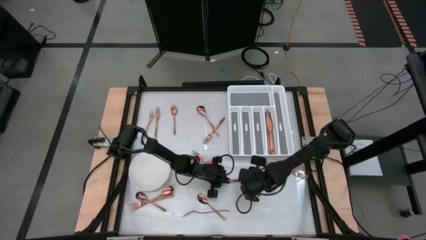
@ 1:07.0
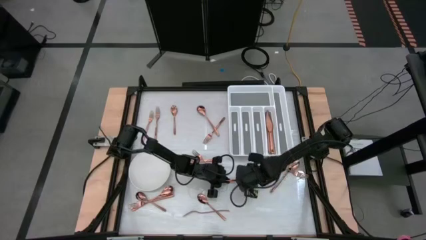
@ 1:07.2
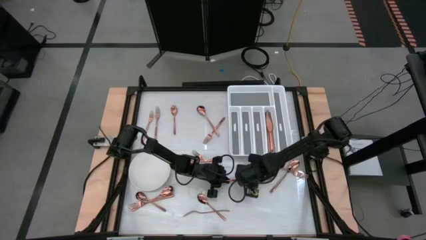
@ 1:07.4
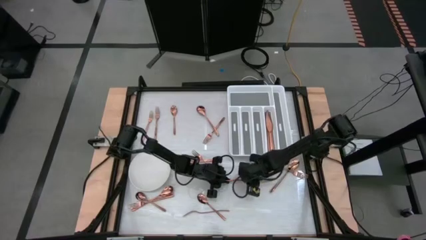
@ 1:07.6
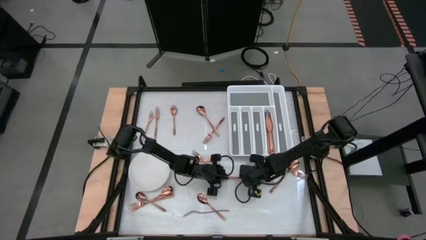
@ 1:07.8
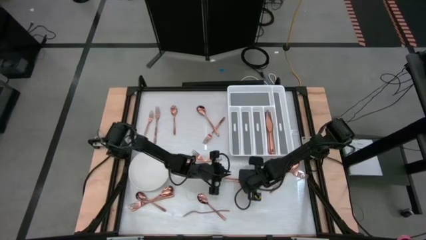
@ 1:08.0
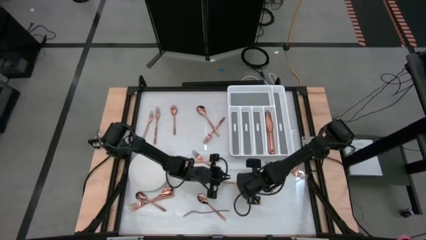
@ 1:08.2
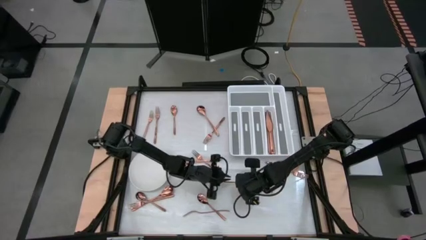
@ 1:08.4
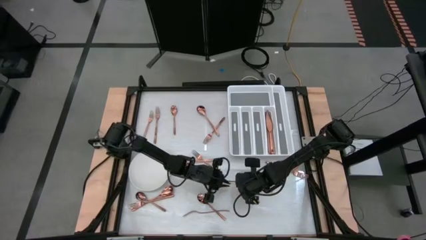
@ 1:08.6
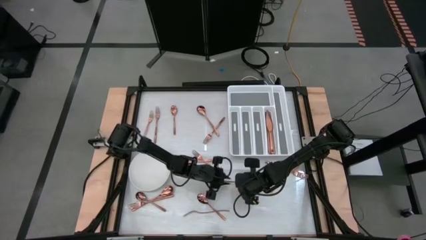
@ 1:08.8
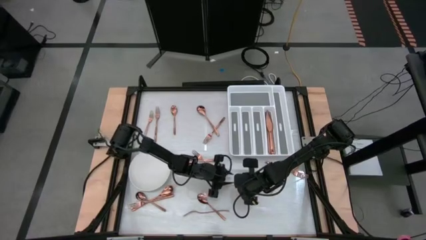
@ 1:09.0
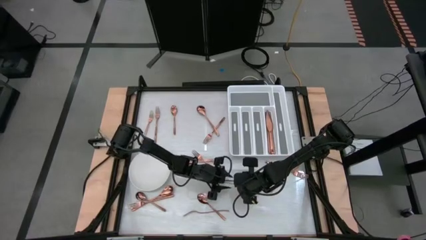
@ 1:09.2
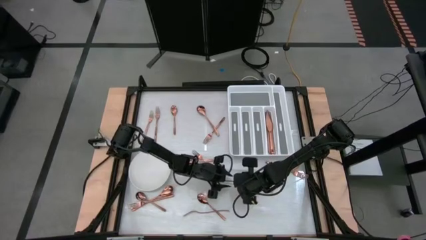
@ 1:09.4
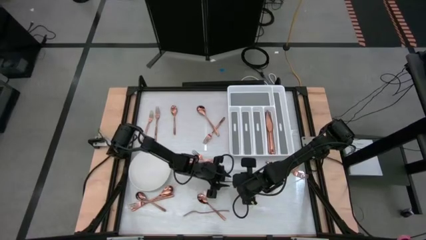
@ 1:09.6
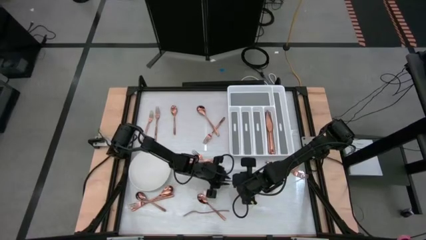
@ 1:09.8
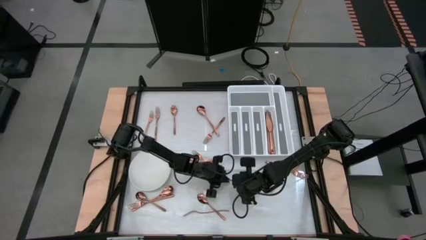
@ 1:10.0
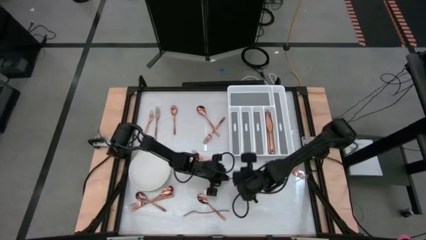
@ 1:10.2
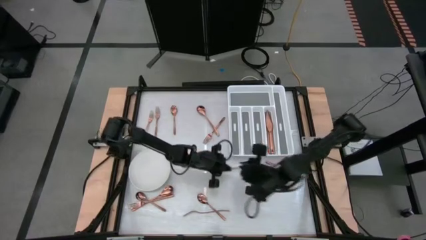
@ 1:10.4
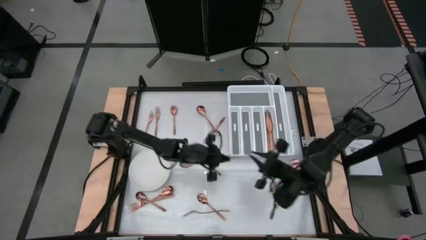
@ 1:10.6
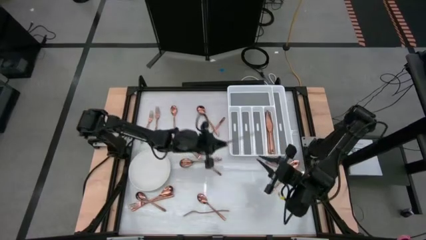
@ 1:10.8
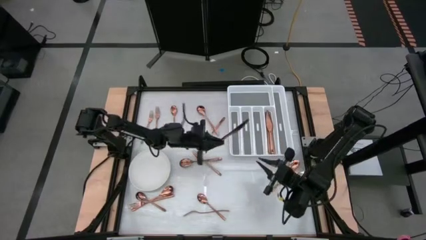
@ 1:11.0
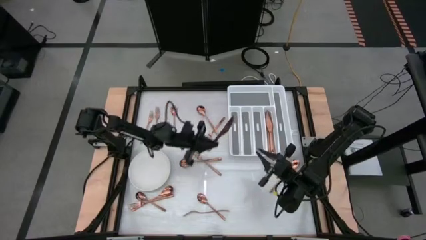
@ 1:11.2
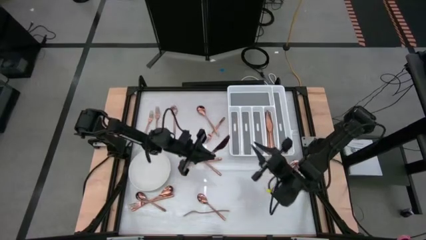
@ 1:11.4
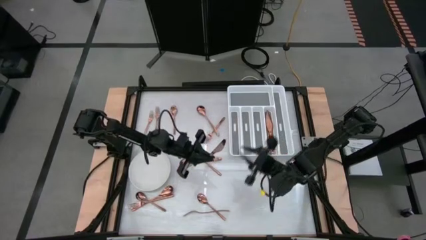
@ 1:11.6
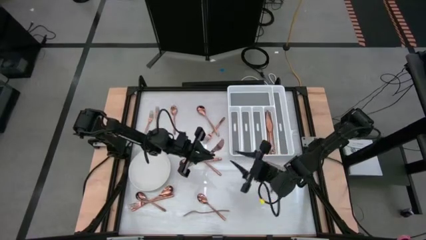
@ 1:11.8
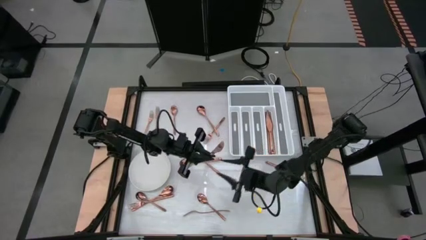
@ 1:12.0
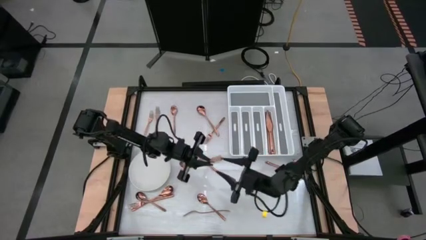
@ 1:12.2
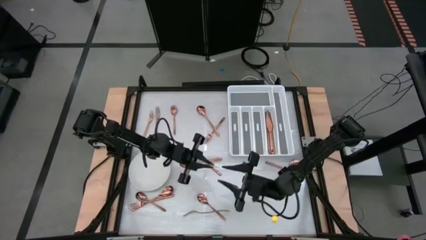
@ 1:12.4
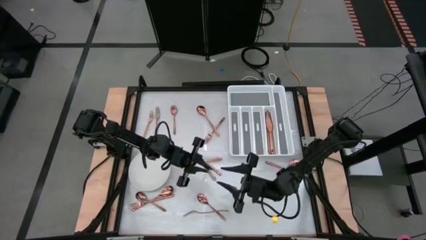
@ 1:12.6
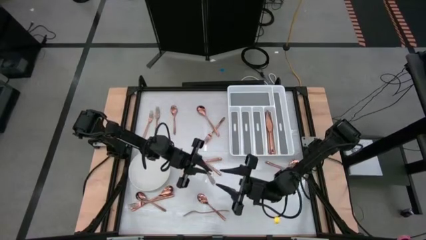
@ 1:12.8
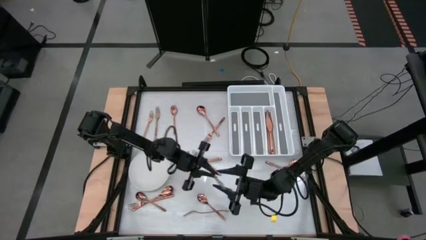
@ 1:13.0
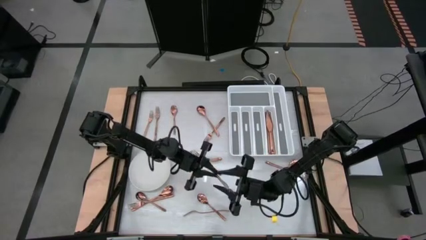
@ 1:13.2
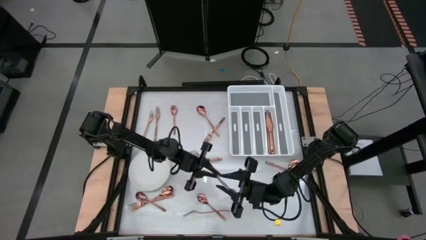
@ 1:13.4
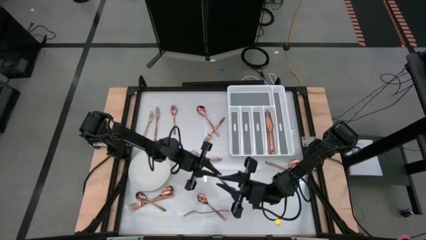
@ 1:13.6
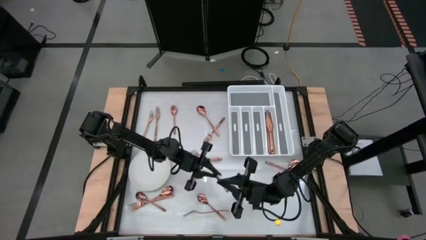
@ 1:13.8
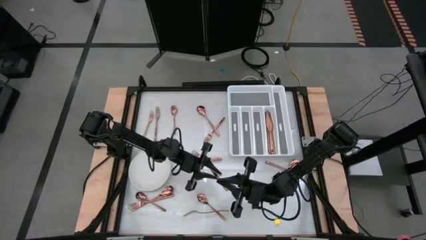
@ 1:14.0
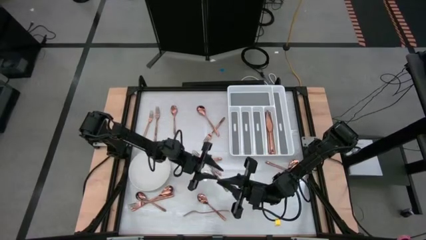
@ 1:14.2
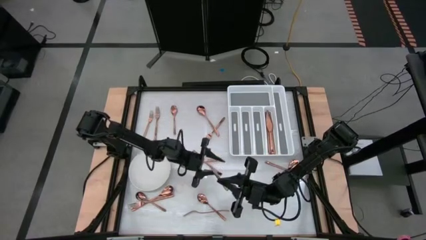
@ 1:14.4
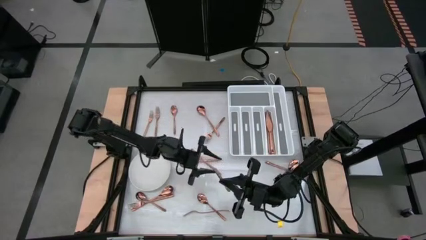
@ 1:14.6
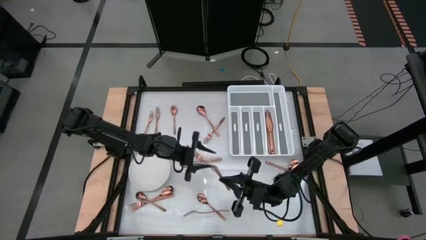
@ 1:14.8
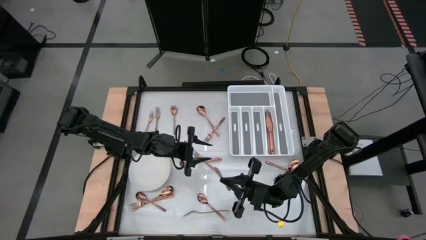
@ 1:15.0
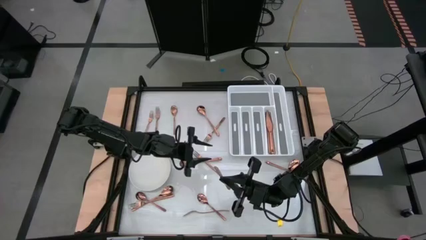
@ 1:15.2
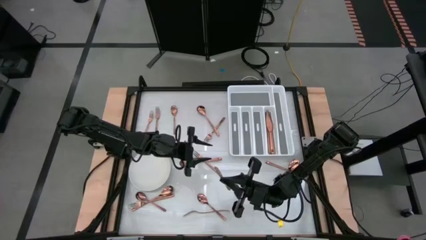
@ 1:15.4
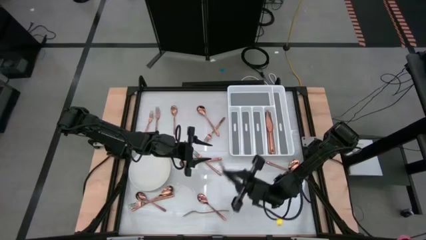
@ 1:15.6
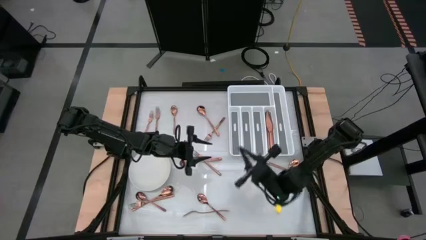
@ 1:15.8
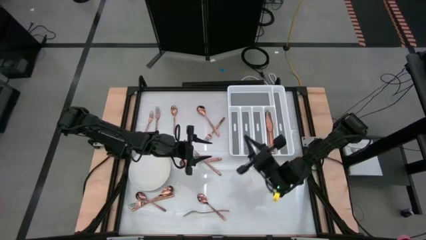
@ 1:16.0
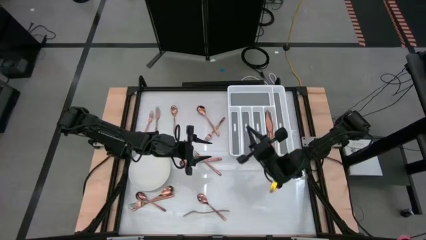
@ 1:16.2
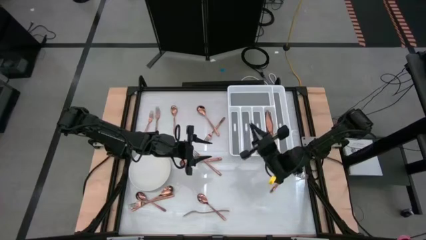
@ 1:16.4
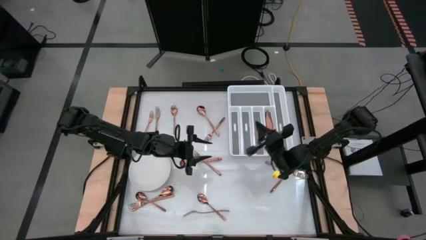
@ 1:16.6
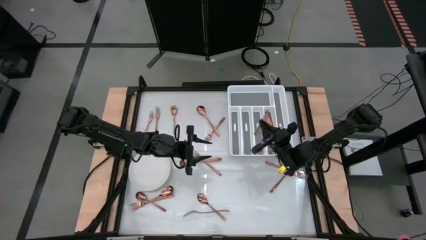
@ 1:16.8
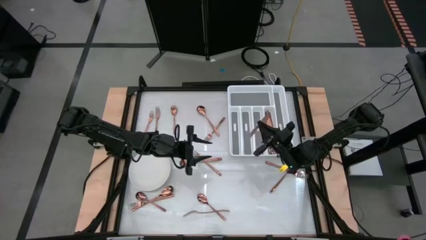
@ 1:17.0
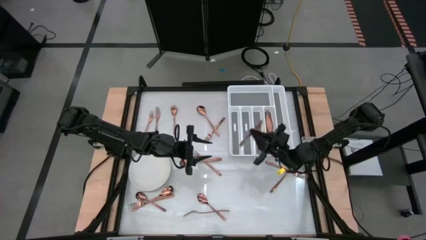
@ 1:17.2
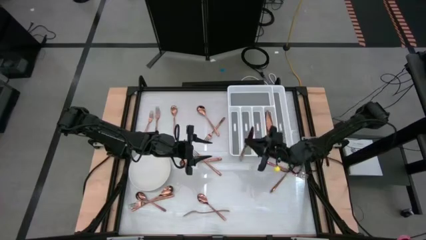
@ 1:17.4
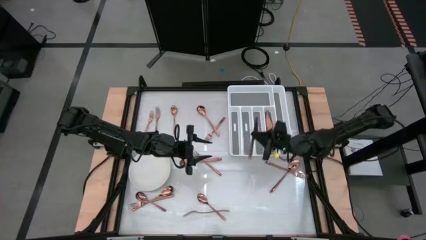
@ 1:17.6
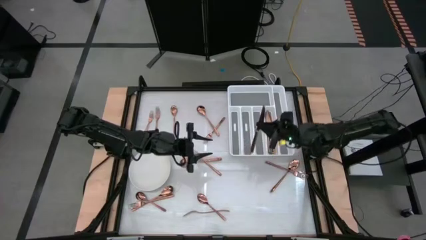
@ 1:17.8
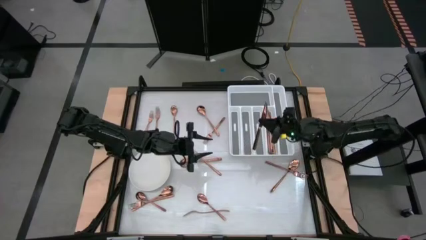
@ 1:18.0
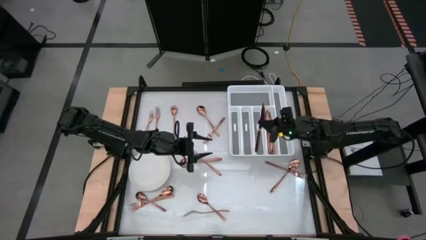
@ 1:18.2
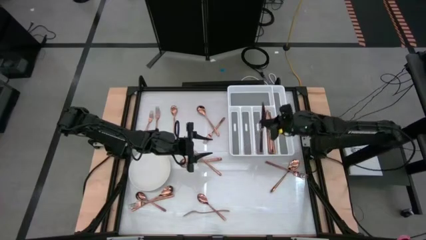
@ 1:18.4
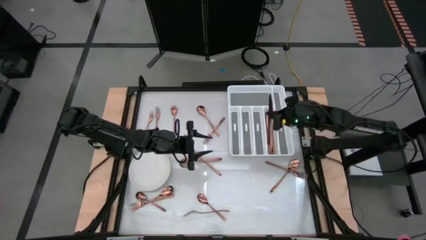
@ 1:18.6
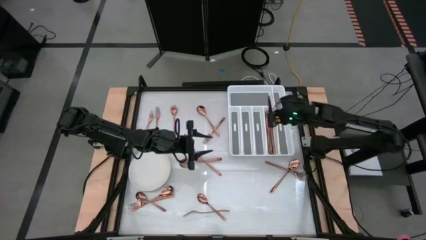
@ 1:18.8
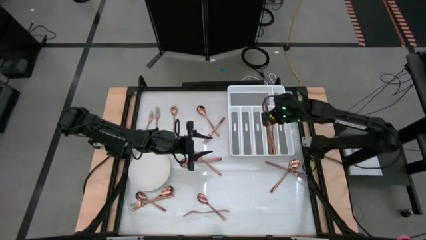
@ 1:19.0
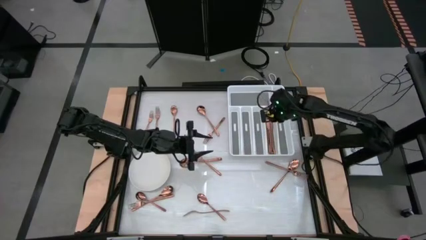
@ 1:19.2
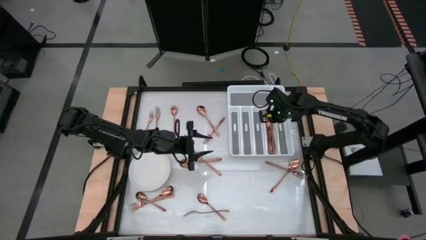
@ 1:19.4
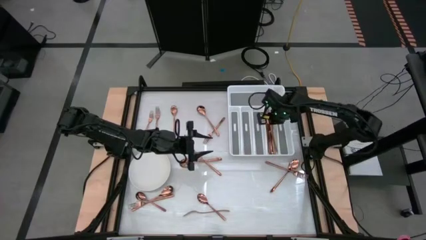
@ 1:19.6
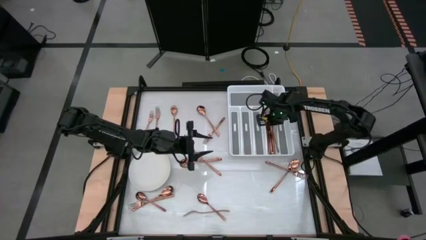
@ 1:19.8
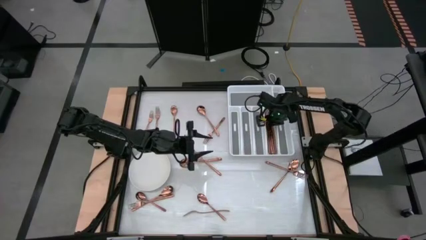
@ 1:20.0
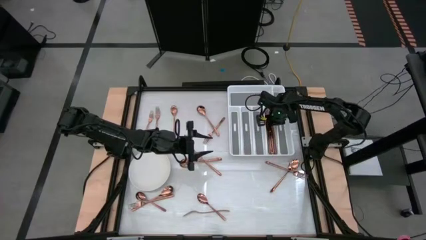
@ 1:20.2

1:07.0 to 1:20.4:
Task: Sort silverware
Put the bronze knife into the silverware tray
